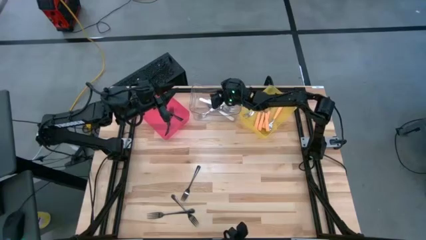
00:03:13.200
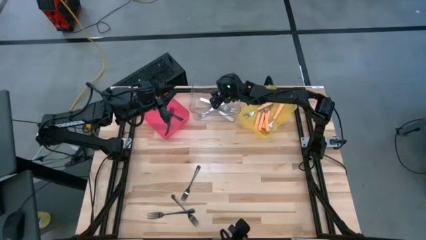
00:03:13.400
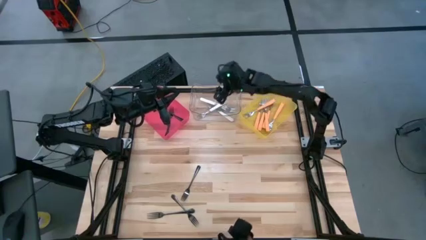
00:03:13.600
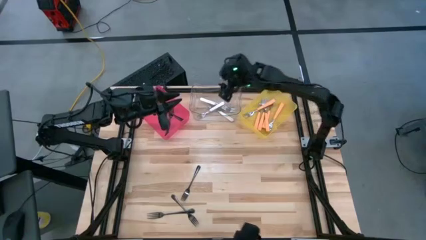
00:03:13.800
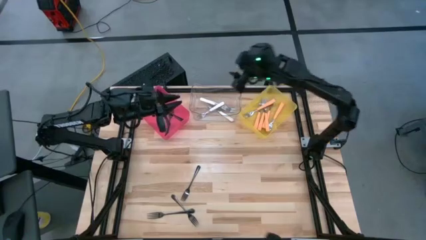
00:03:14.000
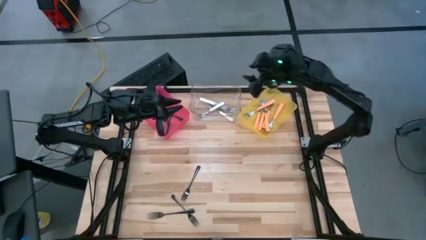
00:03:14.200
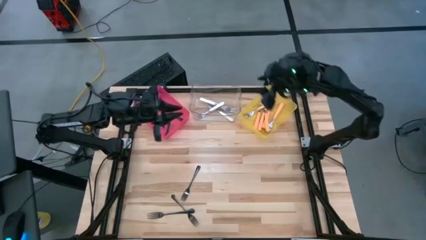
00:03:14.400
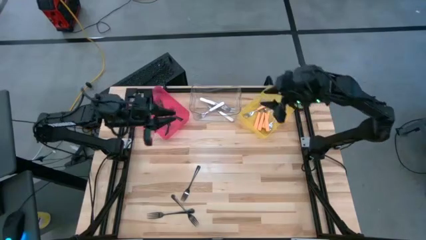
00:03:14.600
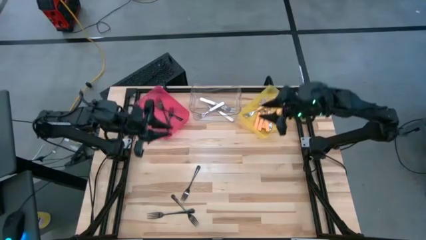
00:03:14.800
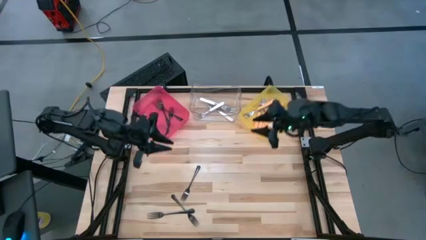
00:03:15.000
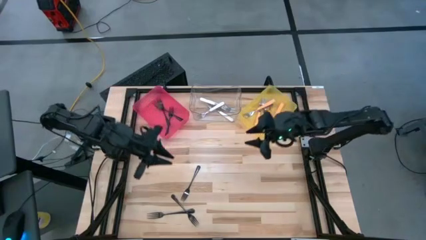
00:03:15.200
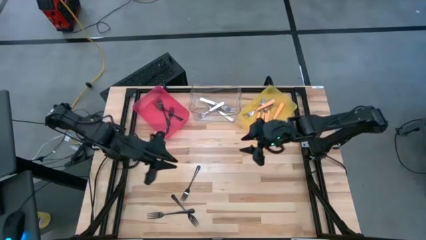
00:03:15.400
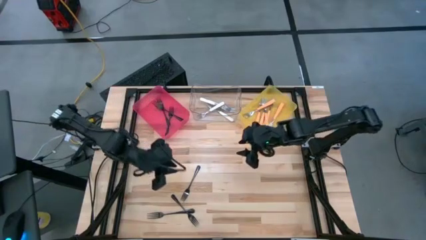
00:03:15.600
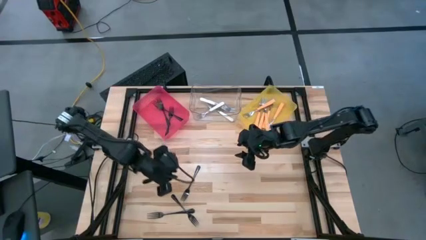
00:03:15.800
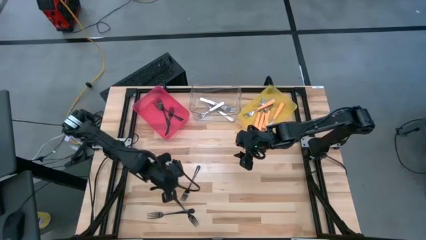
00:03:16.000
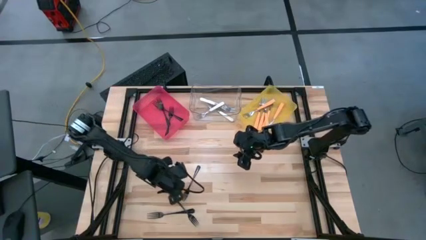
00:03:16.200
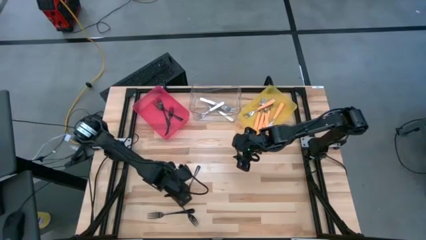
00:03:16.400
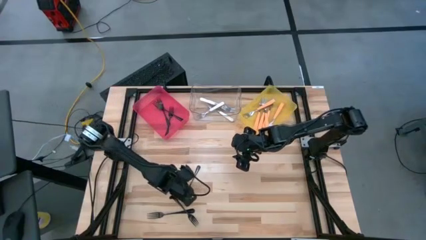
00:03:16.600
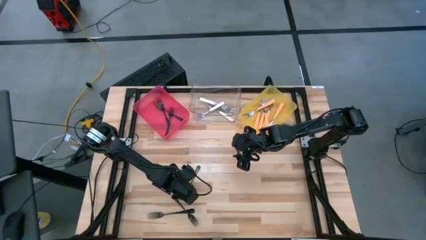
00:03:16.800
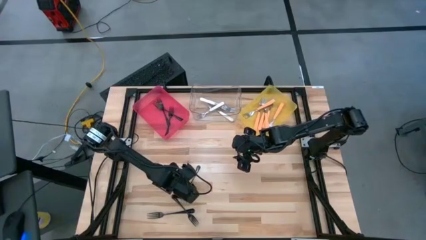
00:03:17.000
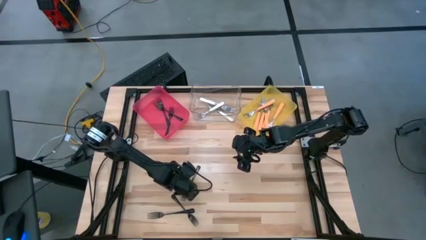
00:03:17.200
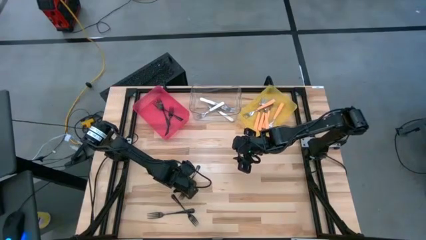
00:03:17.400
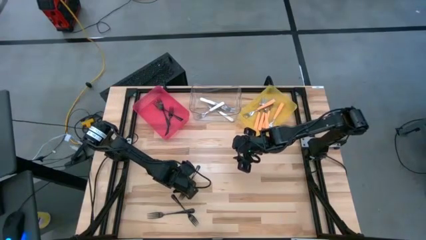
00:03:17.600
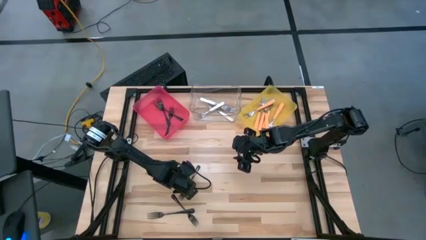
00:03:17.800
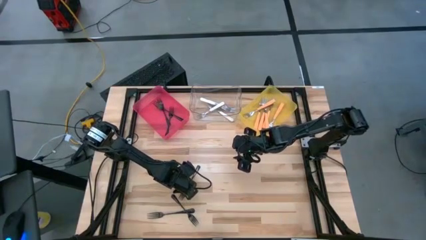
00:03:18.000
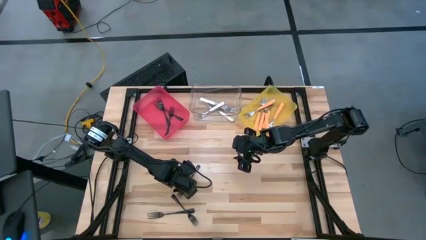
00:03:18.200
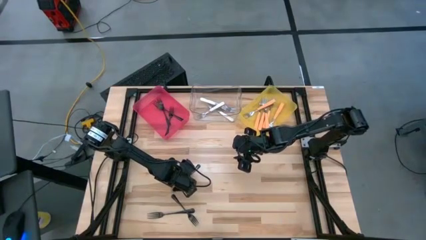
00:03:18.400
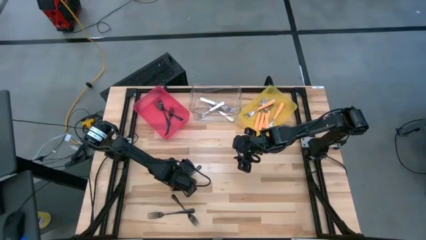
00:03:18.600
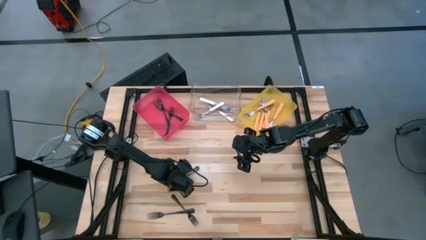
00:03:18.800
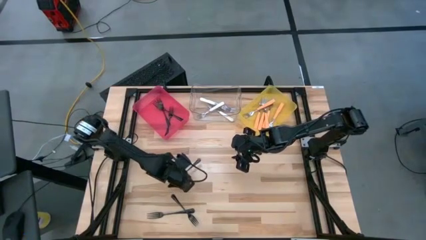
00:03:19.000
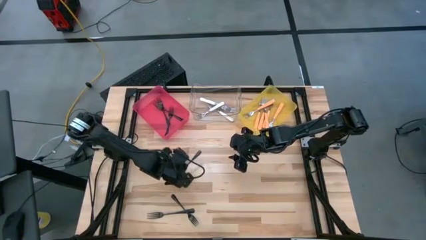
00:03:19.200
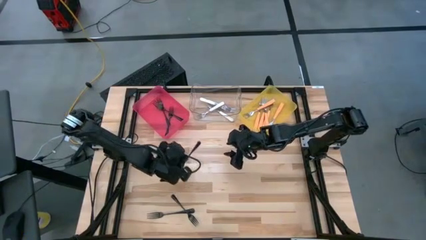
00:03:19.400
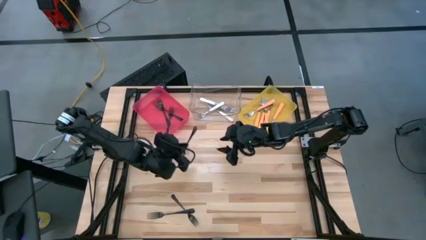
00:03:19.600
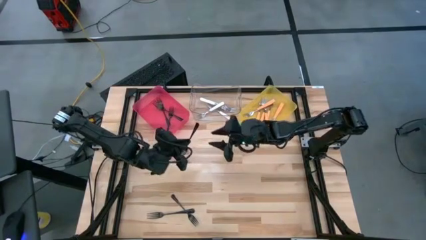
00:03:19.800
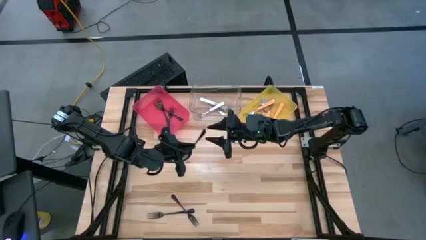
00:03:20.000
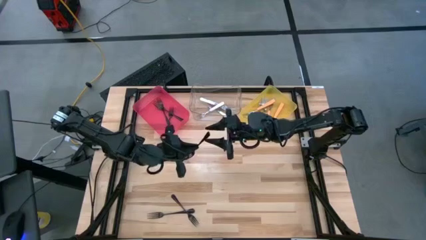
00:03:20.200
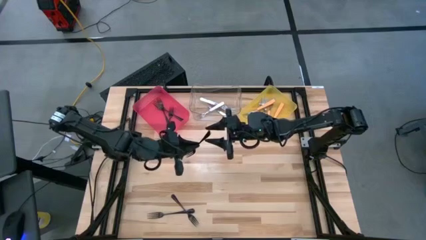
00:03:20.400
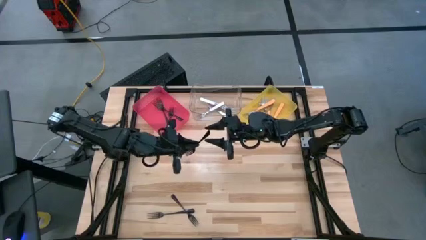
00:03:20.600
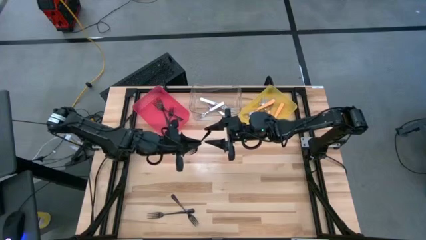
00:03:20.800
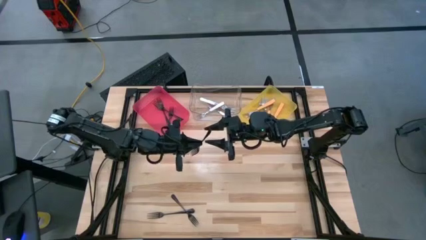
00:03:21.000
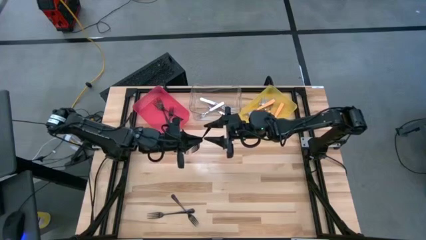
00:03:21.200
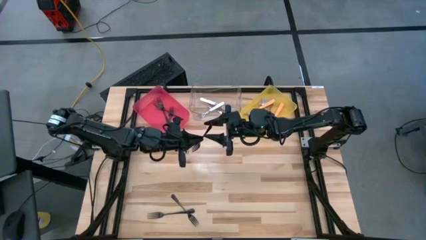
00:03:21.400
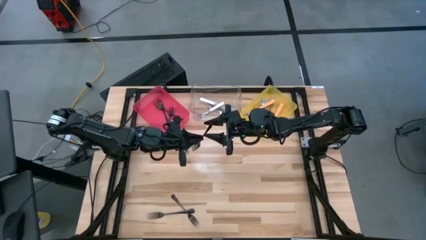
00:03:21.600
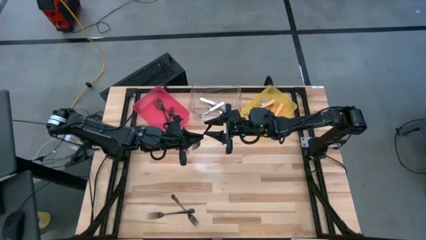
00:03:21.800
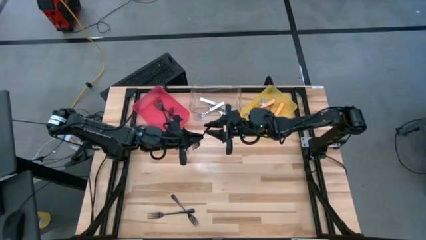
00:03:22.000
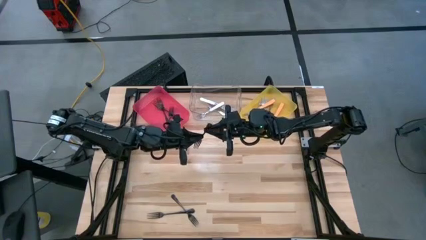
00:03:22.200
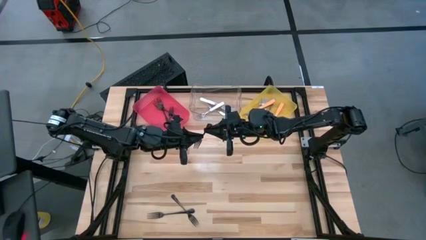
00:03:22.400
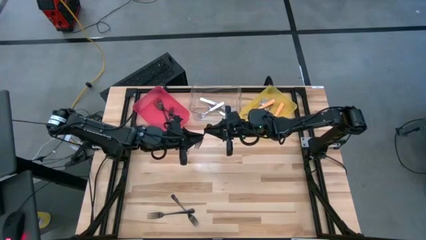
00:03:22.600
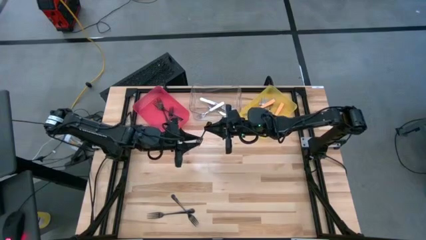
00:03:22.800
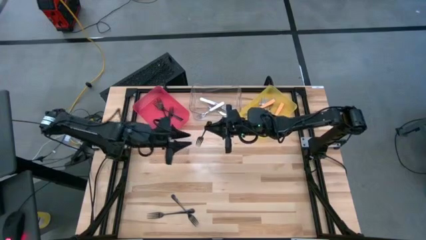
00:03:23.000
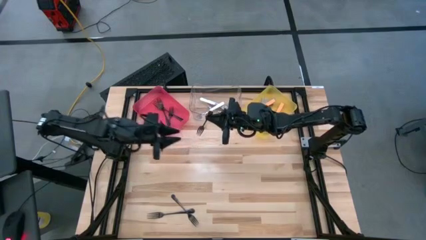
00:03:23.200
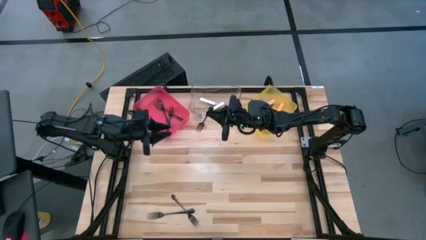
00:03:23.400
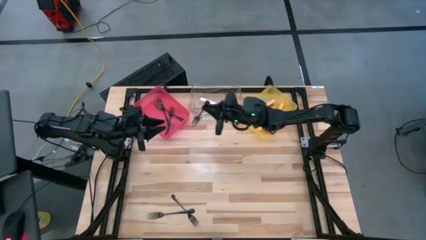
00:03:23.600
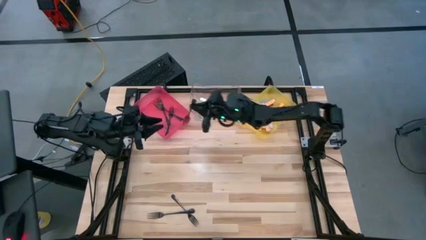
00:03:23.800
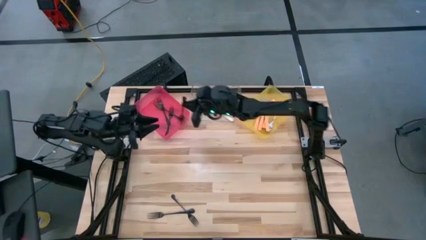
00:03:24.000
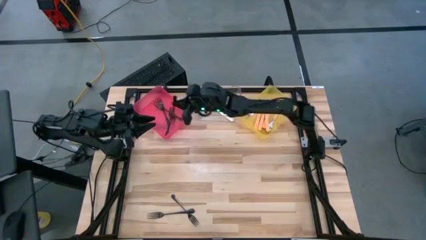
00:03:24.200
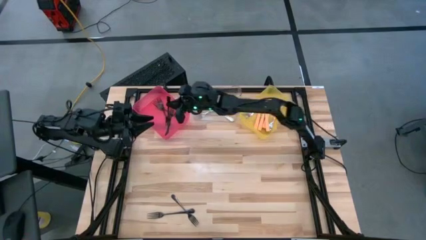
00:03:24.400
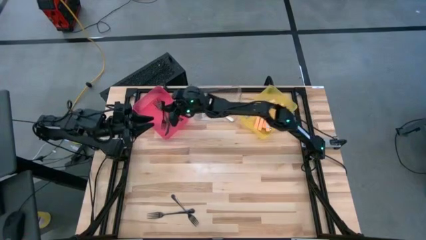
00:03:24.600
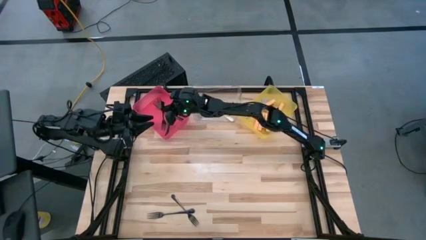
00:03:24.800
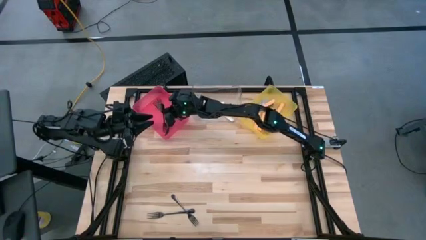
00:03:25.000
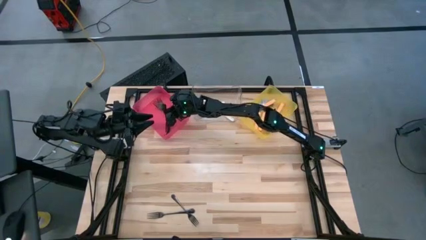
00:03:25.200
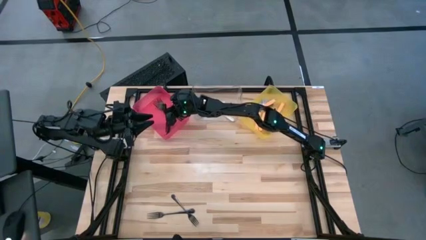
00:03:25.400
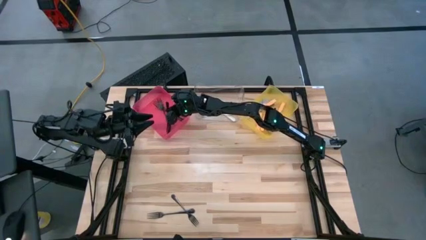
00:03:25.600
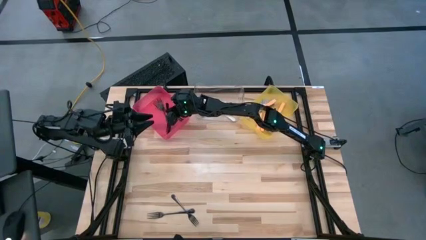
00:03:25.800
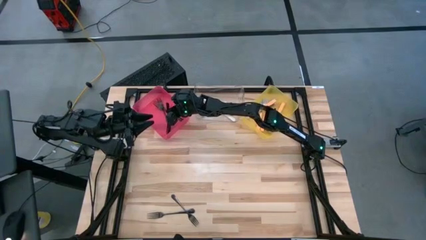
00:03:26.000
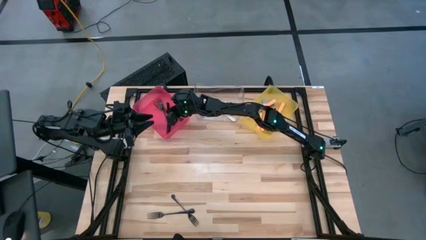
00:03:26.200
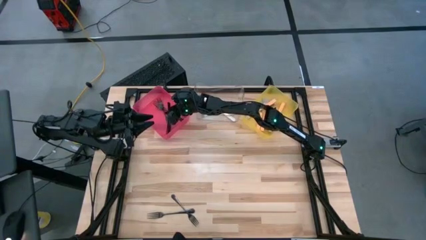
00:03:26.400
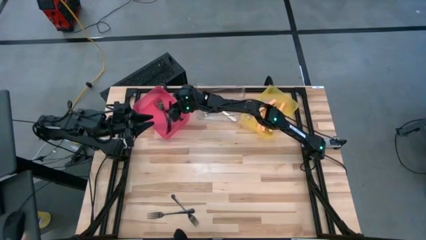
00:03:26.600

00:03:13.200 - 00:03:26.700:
Task: Sort silverware by color (type)
Put the black fork into the pink bin
